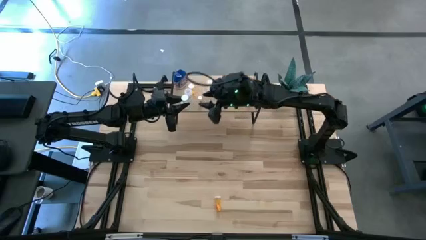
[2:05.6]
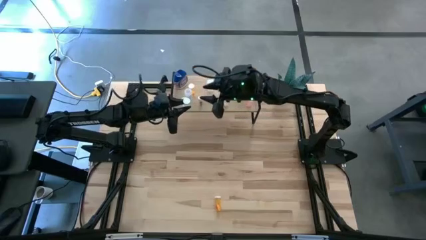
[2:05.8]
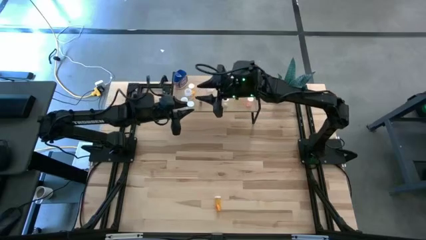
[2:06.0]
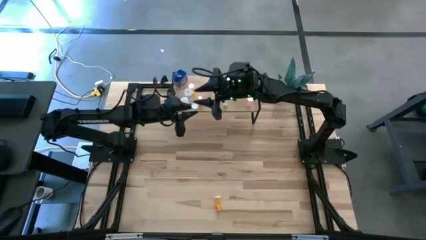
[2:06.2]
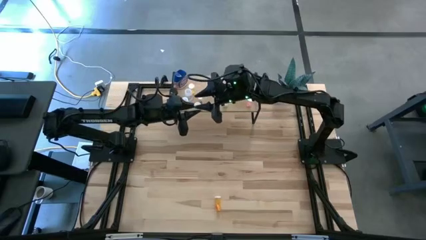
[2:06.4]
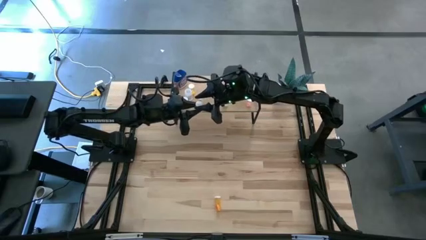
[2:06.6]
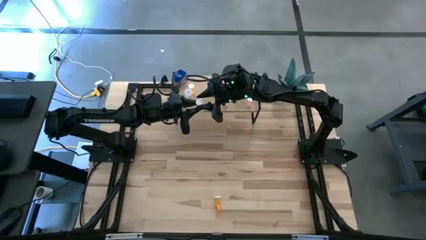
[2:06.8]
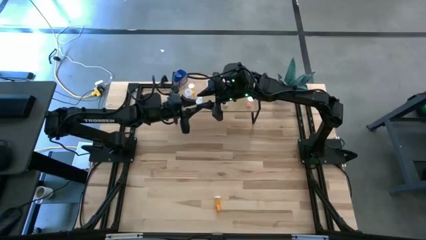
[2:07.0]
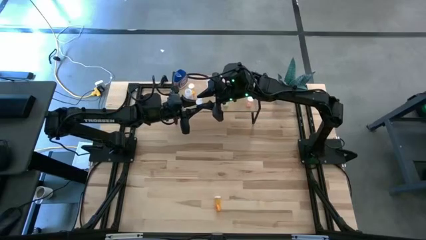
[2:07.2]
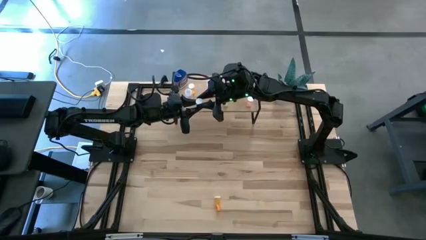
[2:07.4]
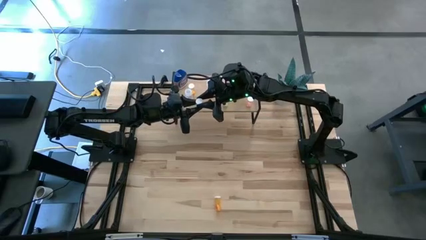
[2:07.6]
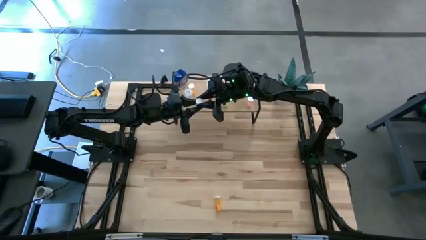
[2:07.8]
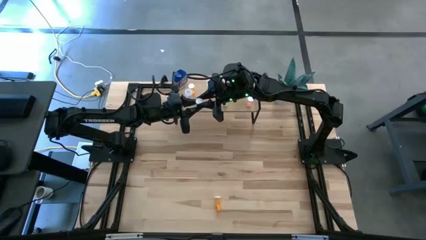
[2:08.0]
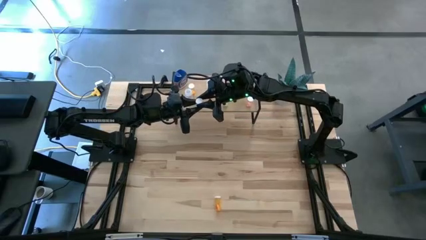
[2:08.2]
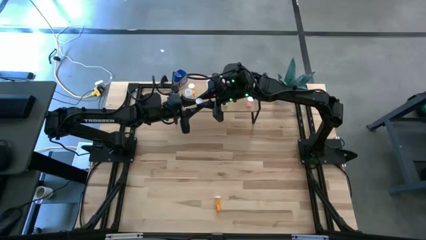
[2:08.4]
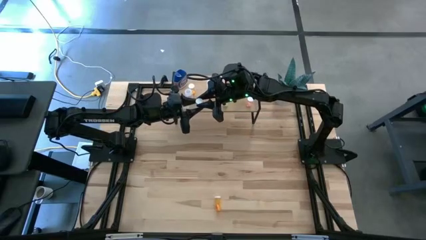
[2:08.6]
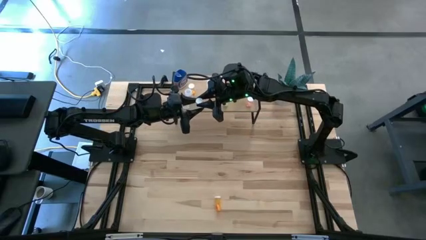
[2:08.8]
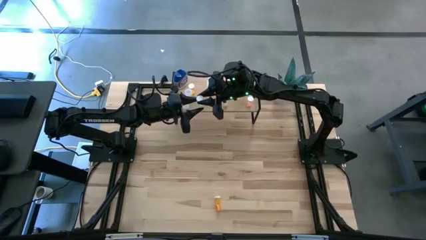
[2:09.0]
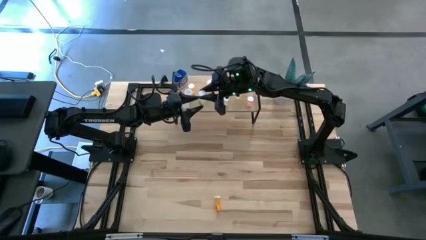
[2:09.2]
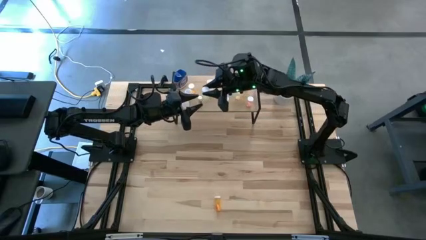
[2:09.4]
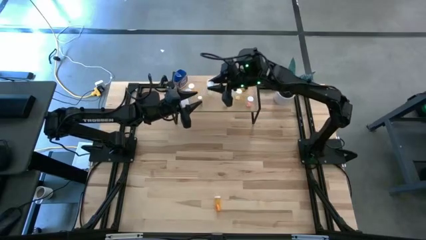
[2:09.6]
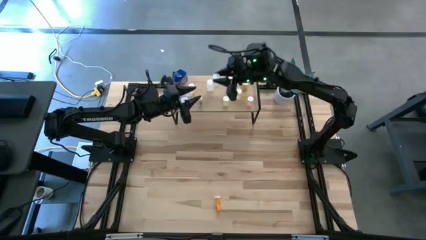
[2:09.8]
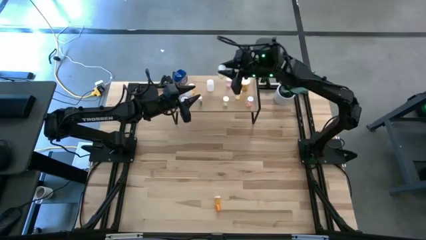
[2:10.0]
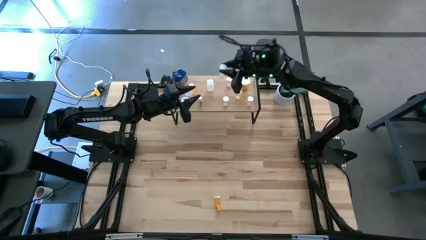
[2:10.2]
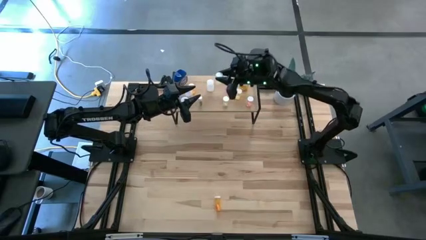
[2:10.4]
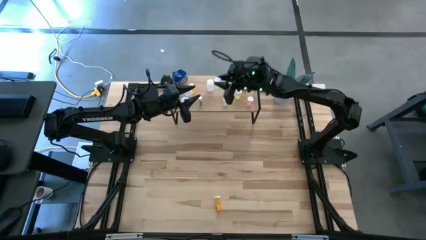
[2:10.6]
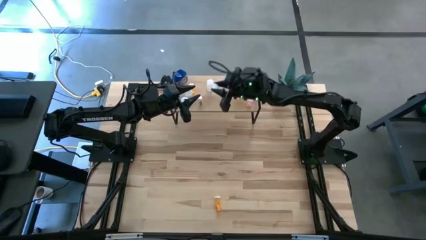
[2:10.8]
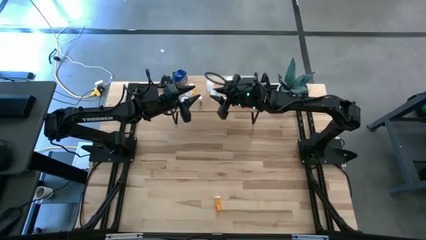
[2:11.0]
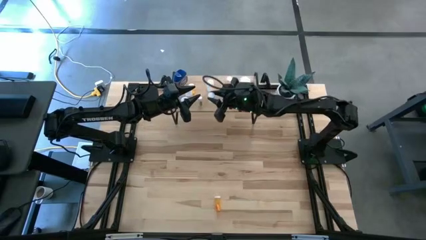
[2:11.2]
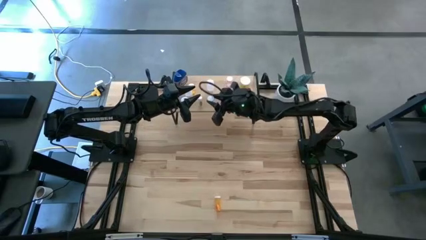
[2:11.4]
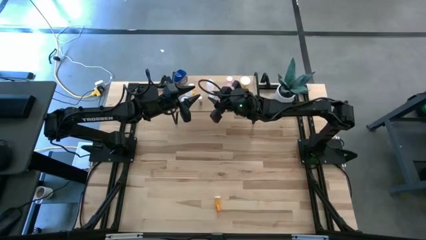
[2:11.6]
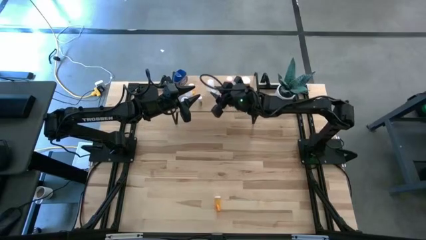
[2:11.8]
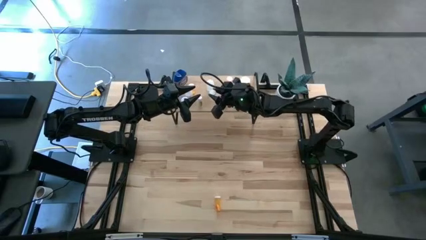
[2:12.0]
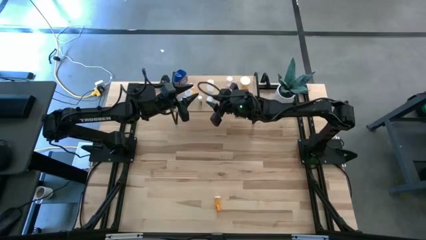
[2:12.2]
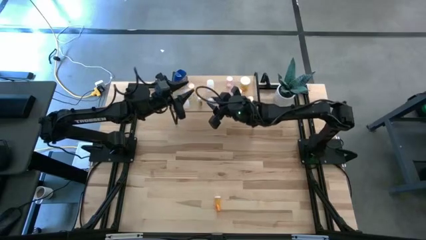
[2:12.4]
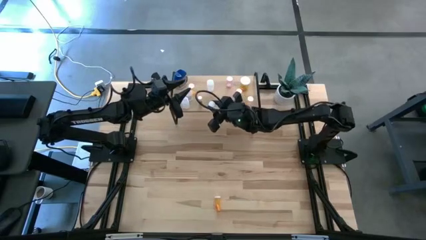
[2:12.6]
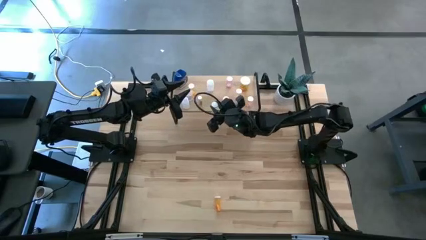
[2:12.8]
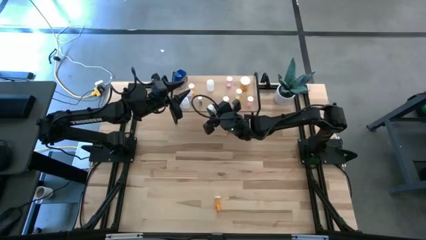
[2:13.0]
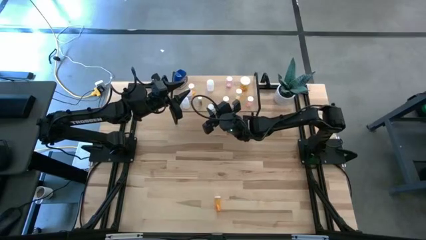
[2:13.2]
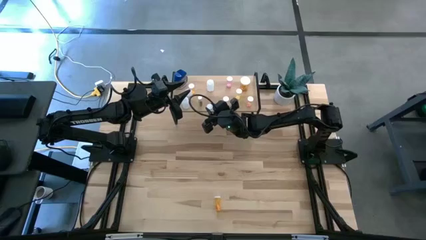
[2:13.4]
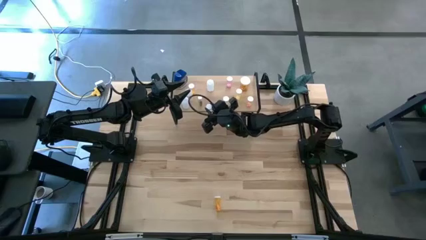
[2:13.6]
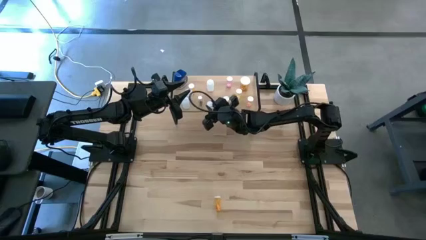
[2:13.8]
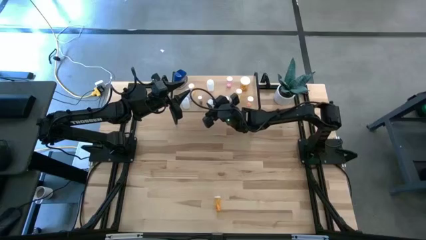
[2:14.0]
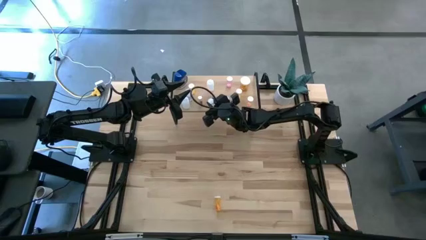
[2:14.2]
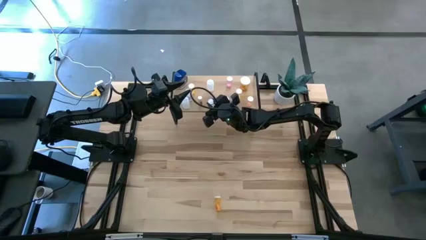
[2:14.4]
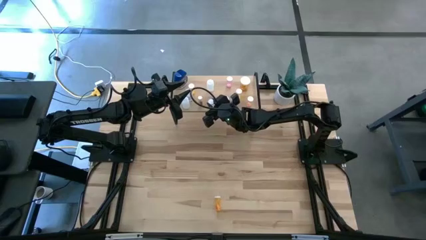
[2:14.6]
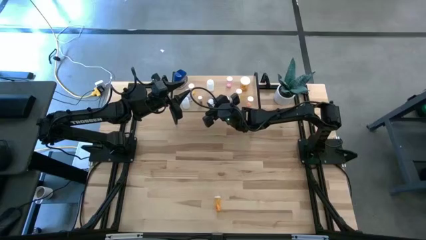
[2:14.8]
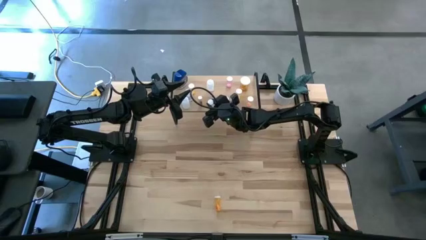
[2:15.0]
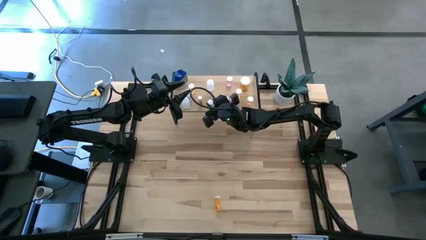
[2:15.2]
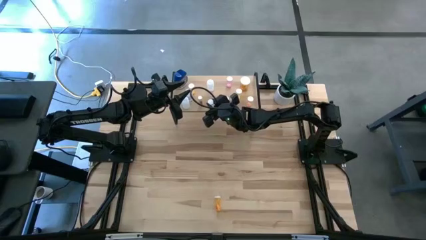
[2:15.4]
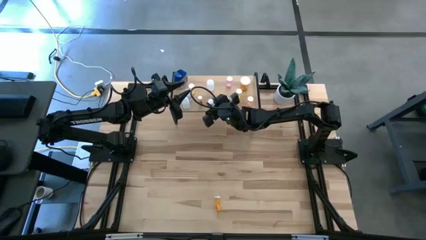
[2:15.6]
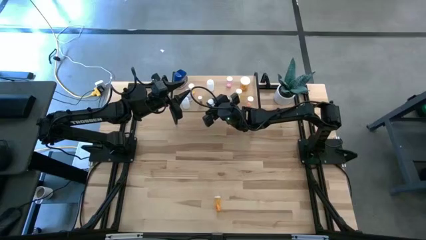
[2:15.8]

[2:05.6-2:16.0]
Task: Pick and place medicine bottles onto shelf by color
Put the yellow pill bottle on the shelf

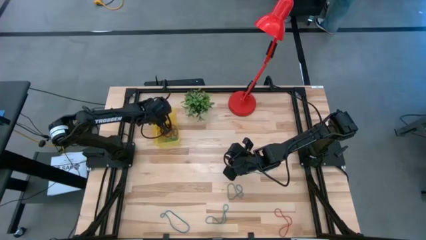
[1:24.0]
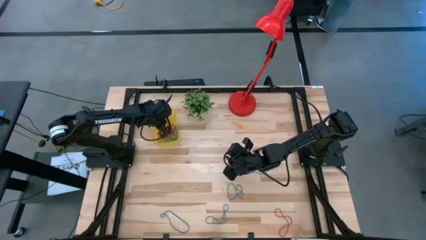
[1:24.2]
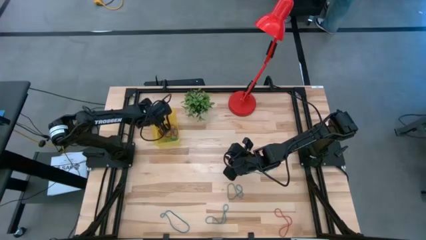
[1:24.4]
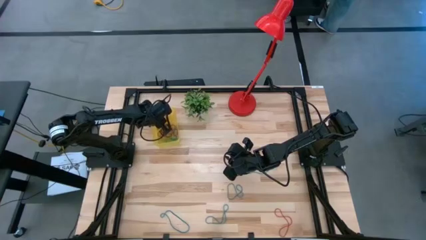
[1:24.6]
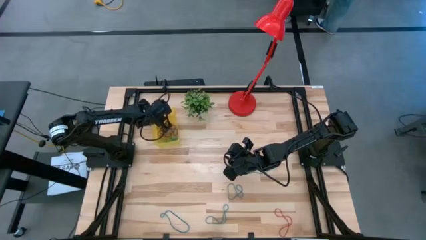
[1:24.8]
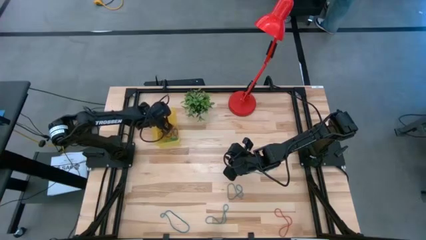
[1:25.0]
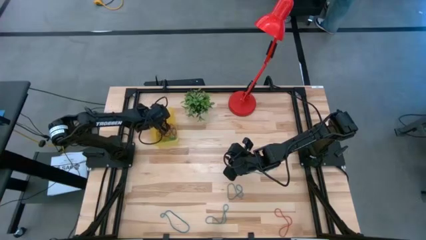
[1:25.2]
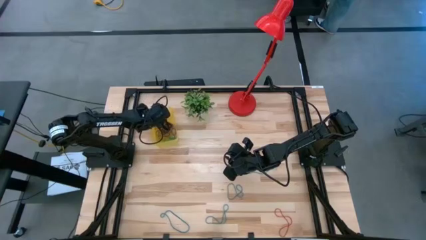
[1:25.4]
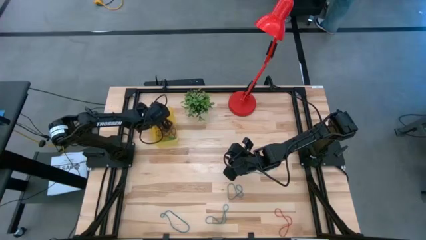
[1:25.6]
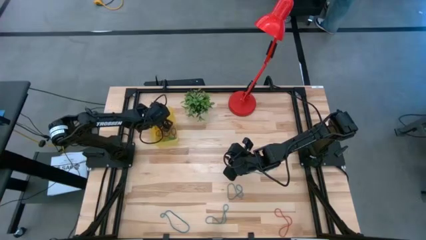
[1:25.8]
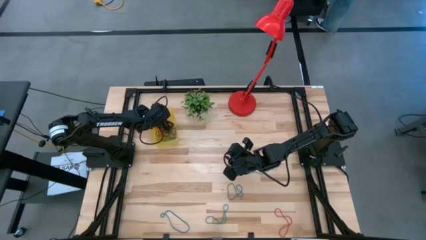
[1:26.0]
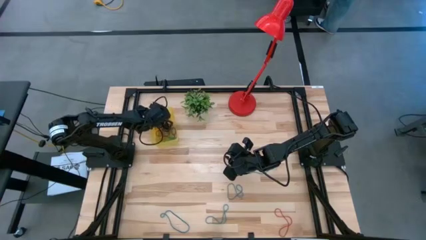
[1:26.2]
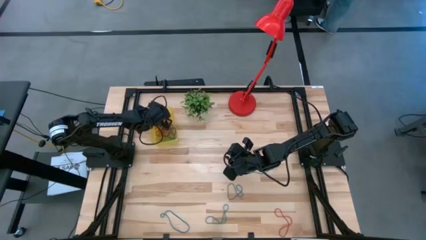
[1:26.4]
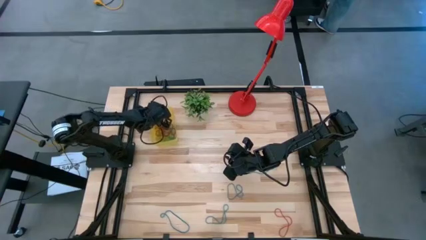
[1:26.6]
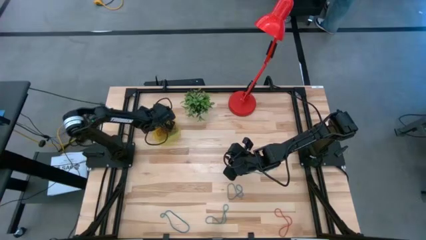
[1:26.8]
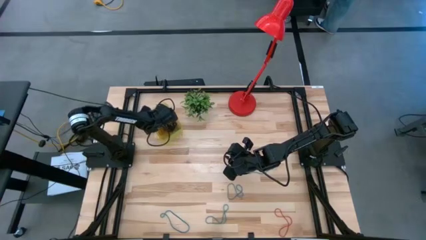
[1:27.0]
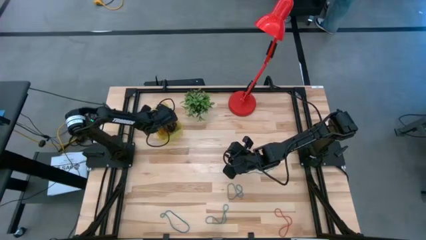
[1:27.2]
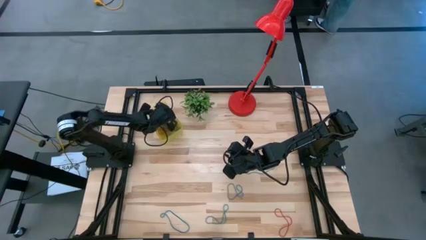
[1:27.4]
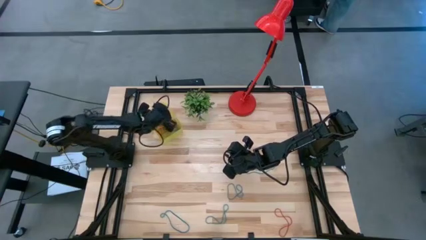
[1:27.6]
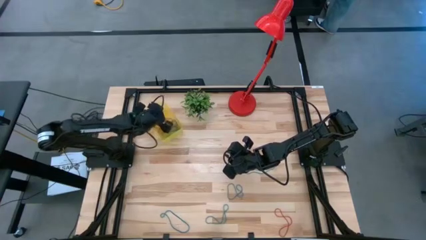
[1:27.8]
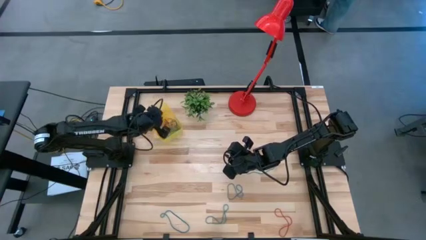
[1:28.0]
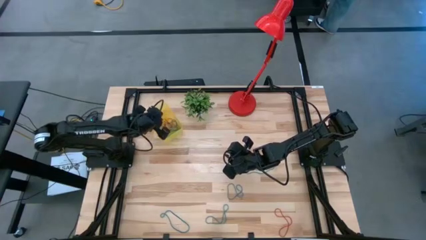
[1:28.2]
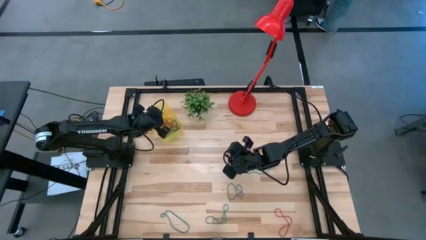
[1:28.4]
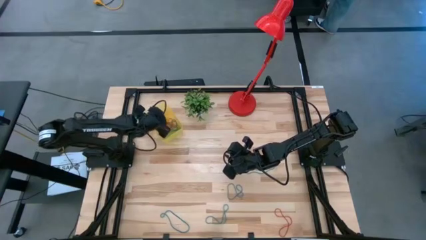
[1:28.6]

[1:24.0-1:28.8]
Task: Pick and place items into bin
Adjust the yellow rubber band into the yellow bin
